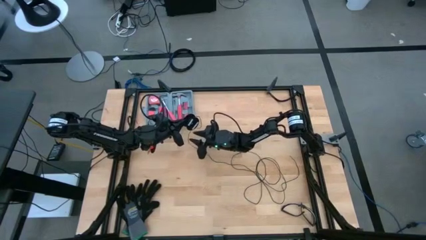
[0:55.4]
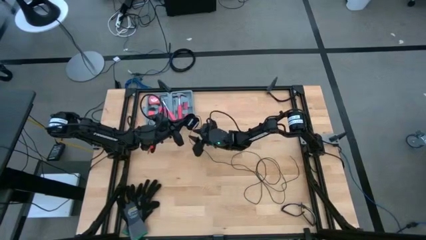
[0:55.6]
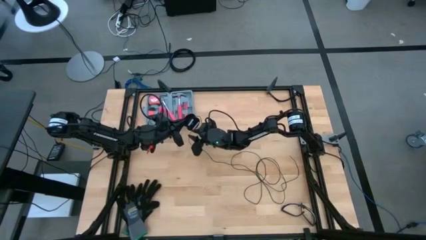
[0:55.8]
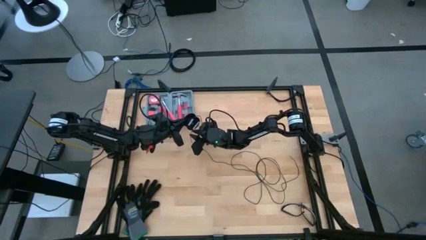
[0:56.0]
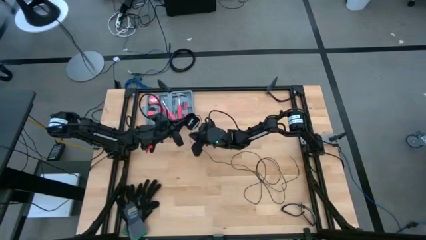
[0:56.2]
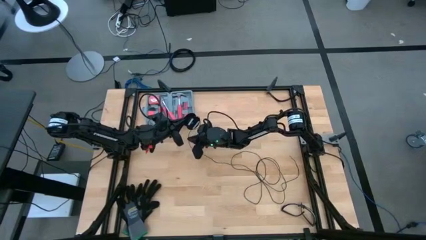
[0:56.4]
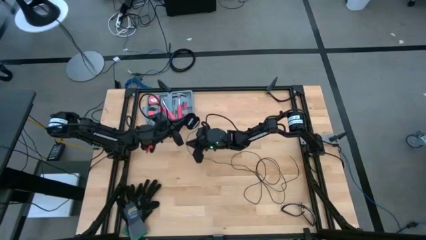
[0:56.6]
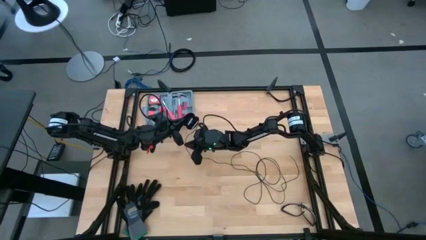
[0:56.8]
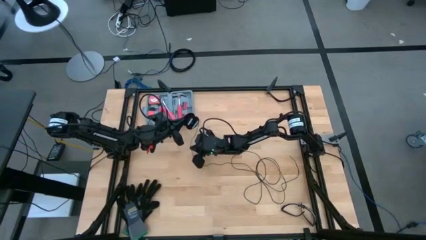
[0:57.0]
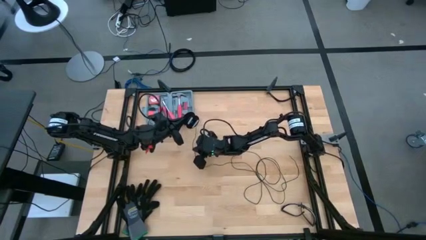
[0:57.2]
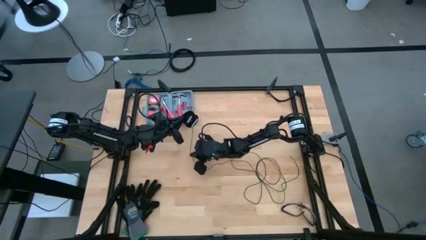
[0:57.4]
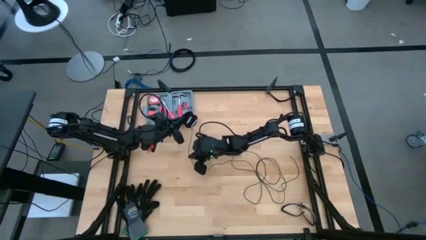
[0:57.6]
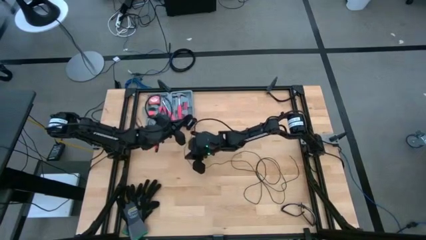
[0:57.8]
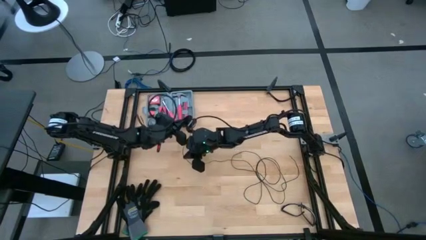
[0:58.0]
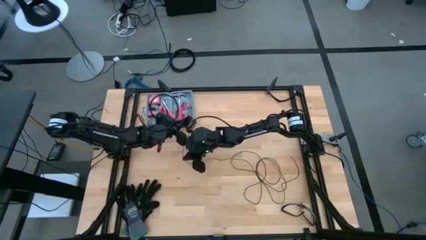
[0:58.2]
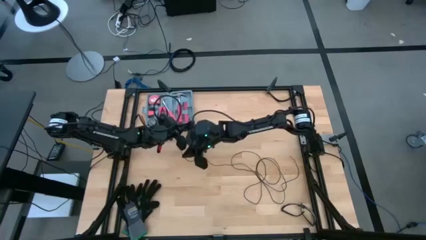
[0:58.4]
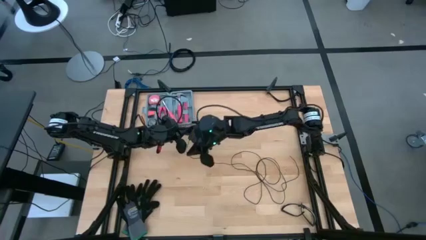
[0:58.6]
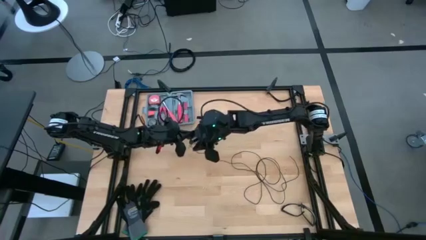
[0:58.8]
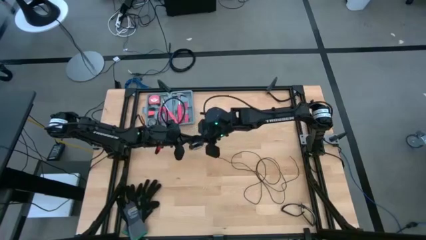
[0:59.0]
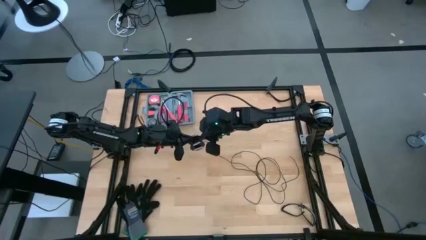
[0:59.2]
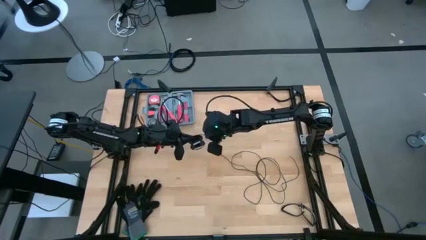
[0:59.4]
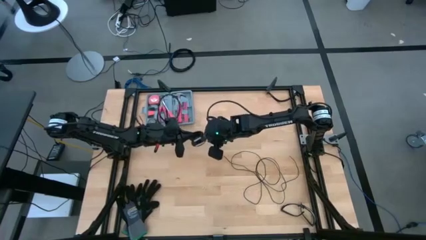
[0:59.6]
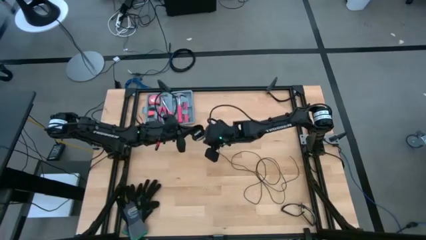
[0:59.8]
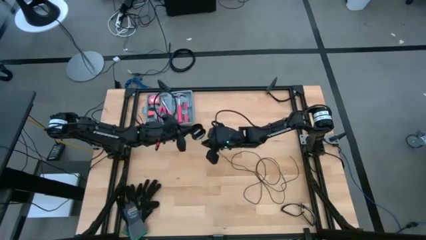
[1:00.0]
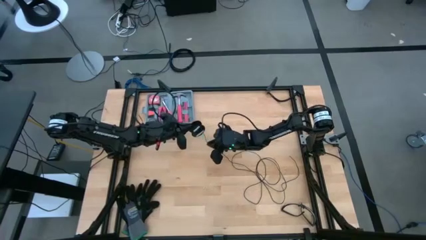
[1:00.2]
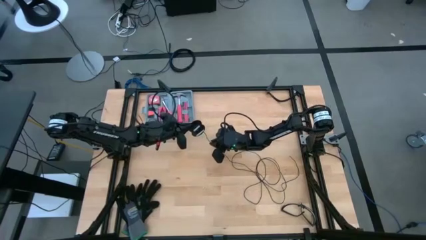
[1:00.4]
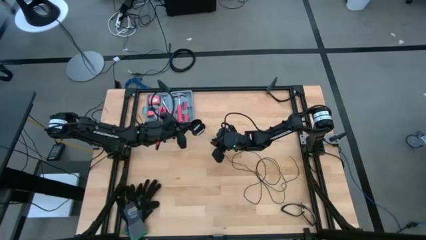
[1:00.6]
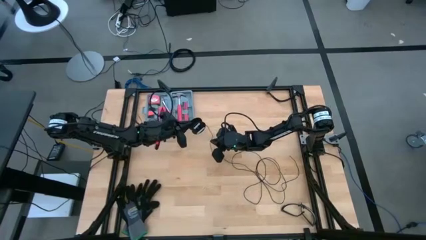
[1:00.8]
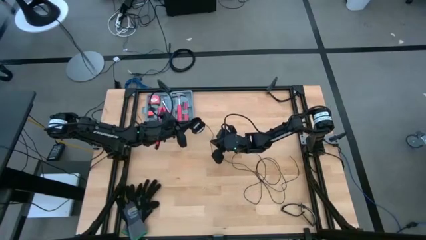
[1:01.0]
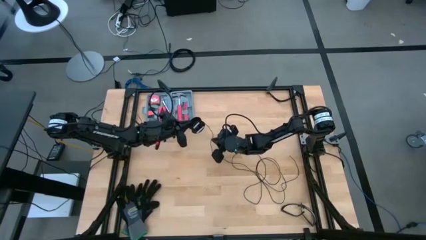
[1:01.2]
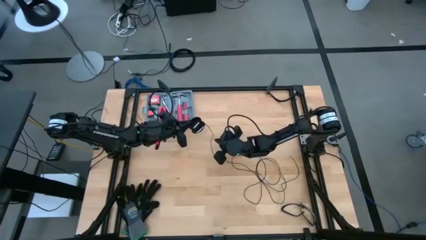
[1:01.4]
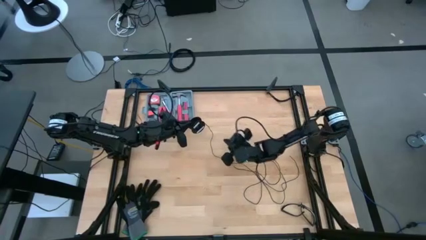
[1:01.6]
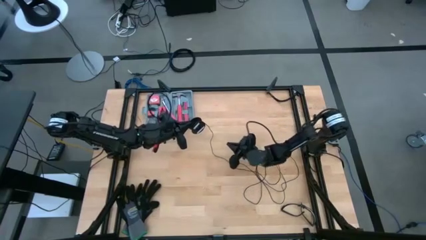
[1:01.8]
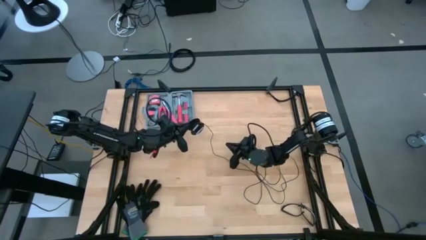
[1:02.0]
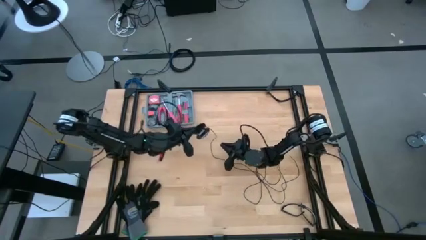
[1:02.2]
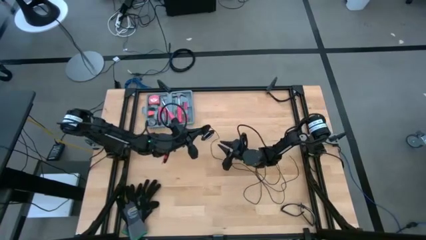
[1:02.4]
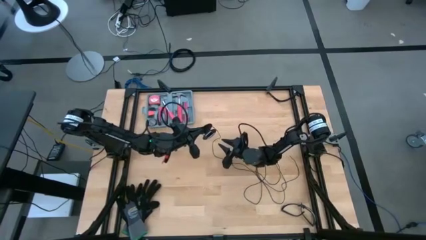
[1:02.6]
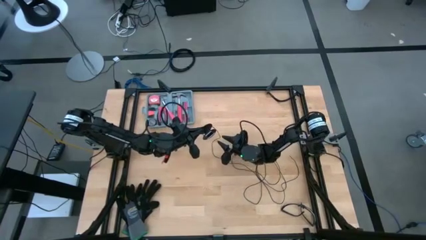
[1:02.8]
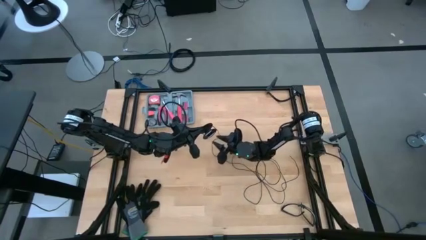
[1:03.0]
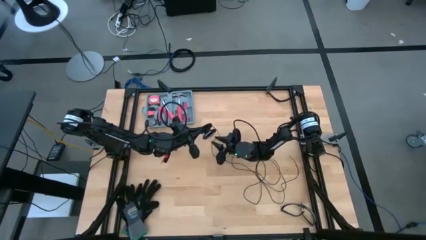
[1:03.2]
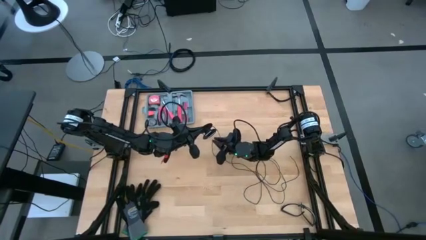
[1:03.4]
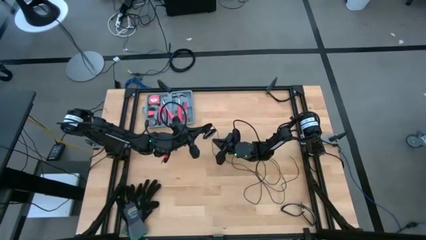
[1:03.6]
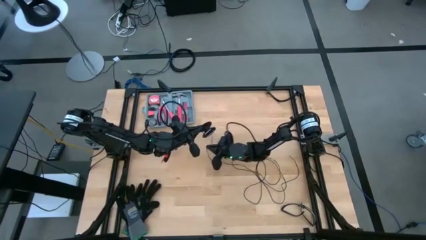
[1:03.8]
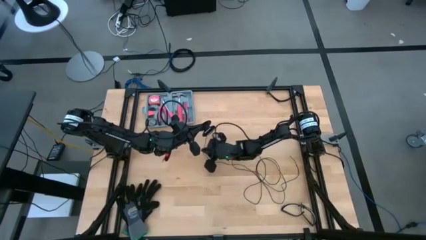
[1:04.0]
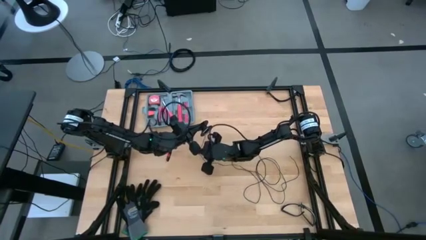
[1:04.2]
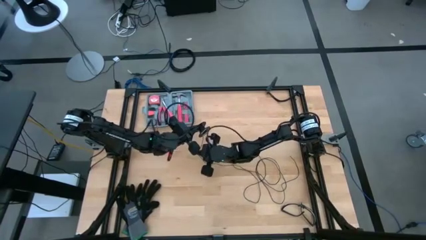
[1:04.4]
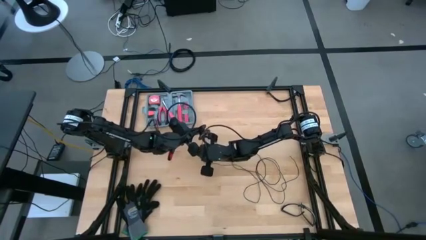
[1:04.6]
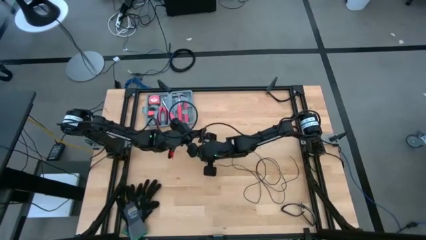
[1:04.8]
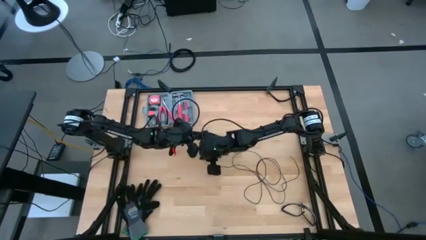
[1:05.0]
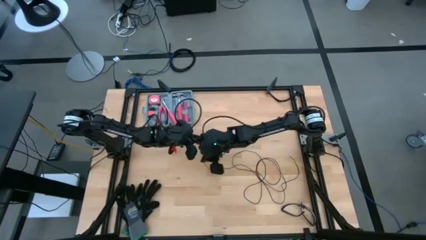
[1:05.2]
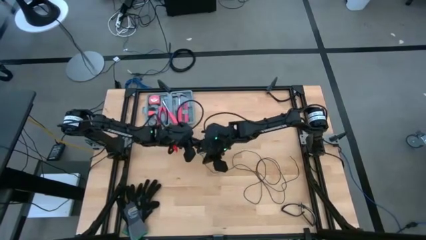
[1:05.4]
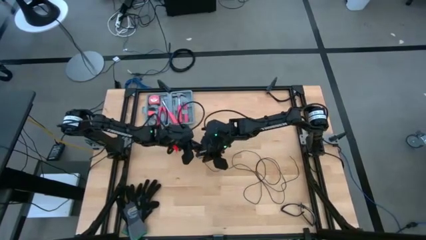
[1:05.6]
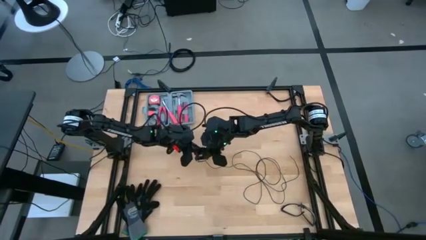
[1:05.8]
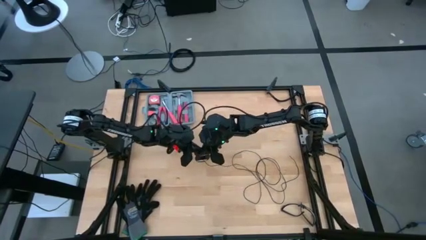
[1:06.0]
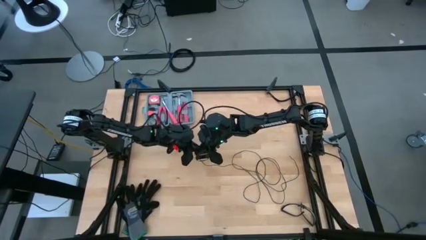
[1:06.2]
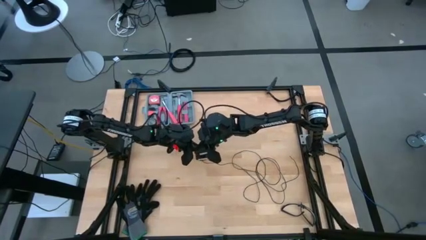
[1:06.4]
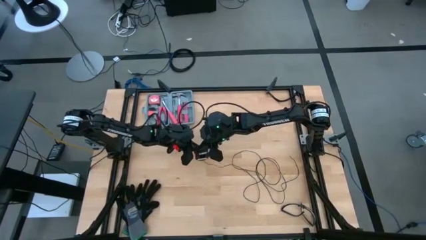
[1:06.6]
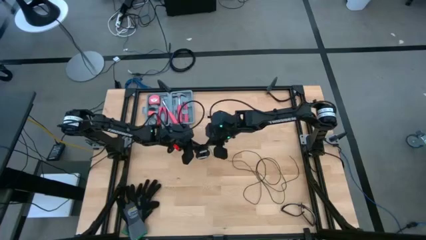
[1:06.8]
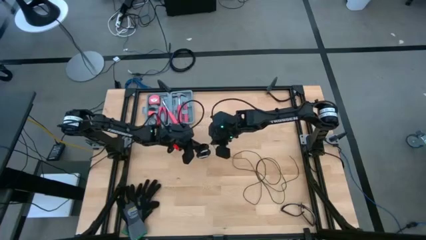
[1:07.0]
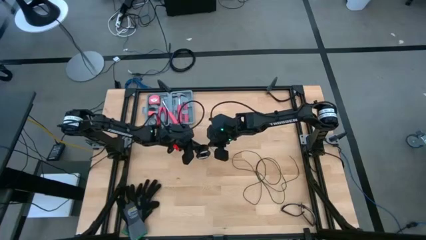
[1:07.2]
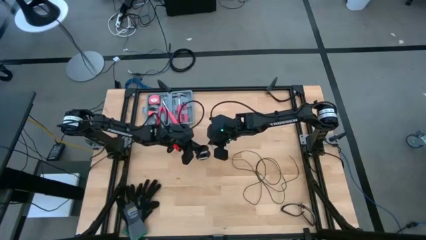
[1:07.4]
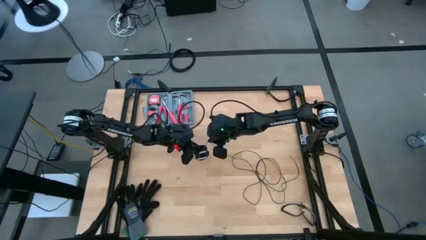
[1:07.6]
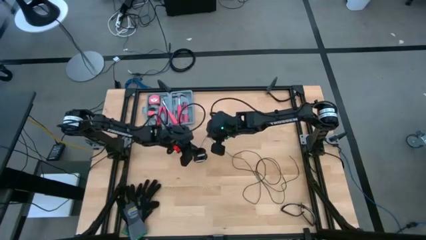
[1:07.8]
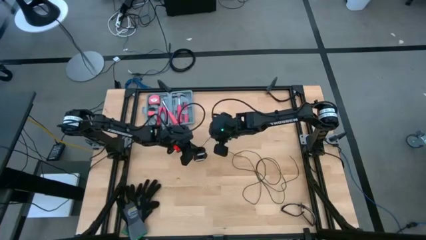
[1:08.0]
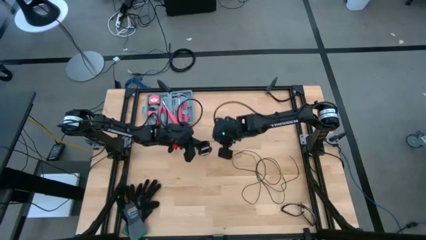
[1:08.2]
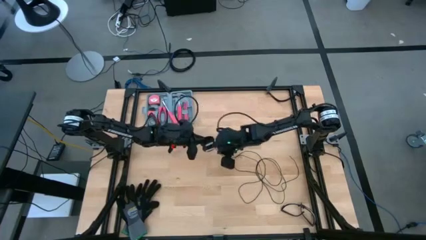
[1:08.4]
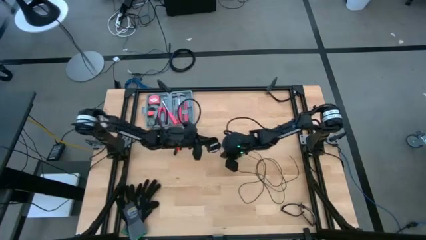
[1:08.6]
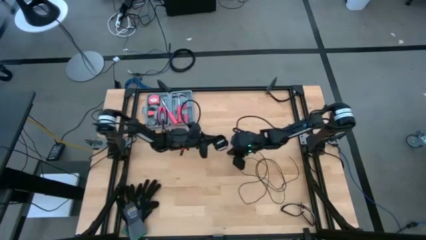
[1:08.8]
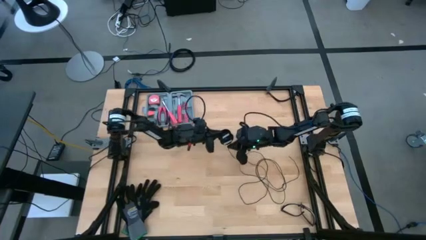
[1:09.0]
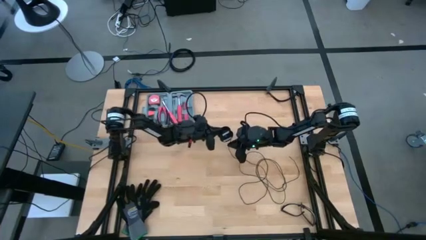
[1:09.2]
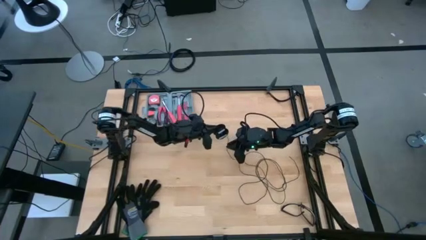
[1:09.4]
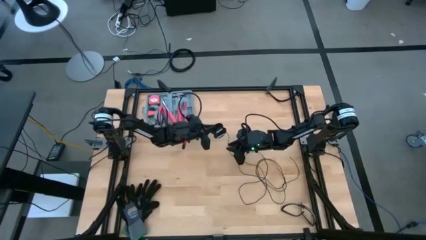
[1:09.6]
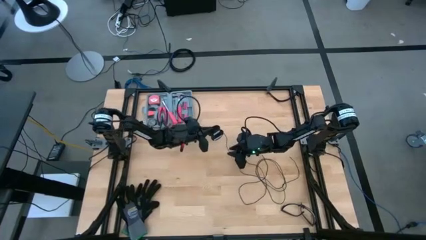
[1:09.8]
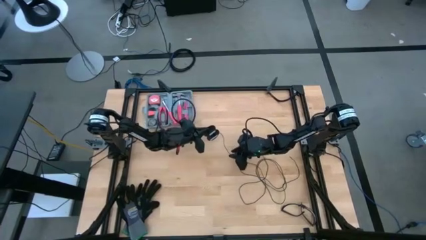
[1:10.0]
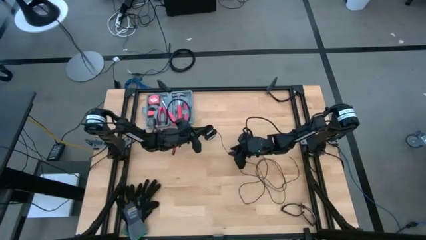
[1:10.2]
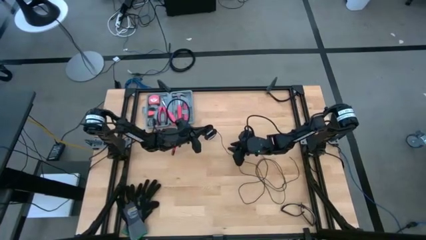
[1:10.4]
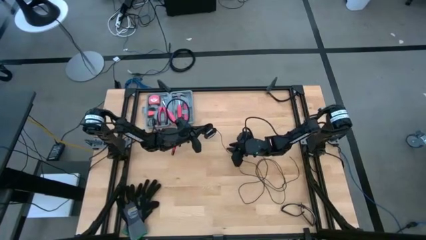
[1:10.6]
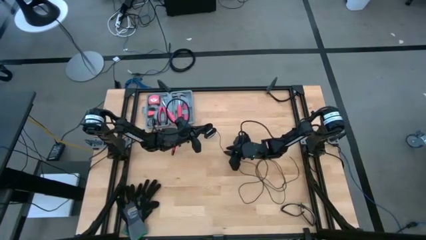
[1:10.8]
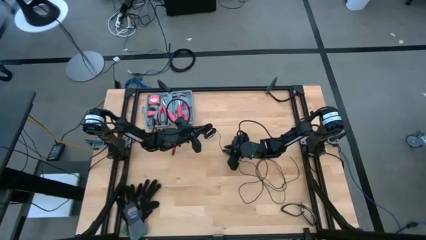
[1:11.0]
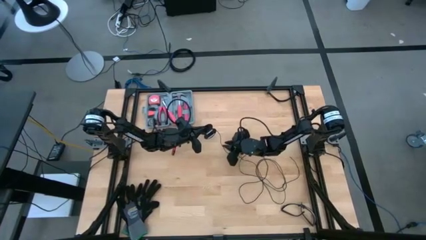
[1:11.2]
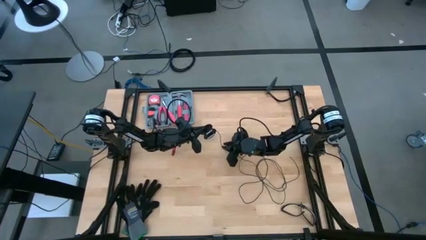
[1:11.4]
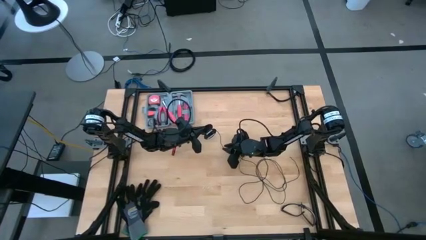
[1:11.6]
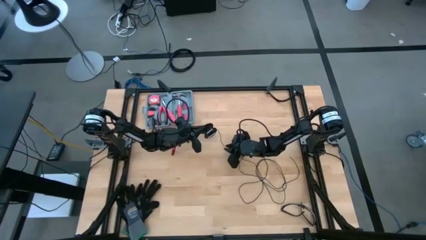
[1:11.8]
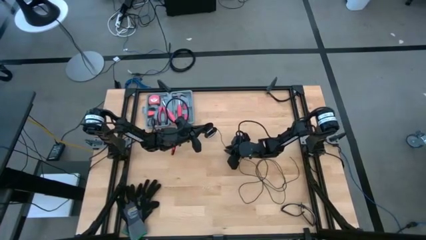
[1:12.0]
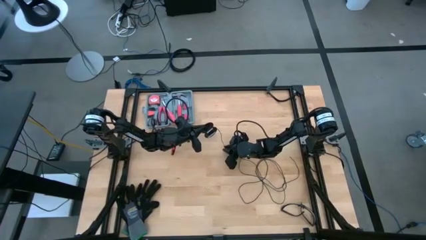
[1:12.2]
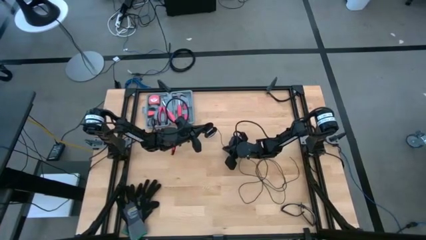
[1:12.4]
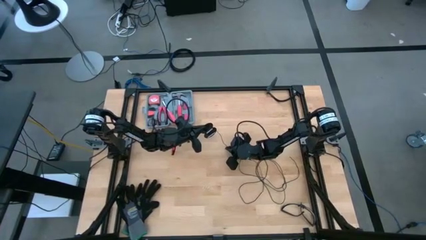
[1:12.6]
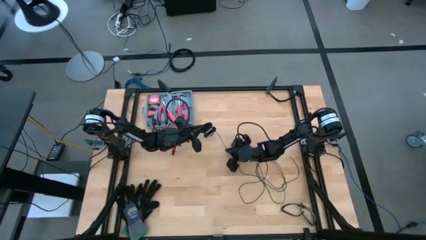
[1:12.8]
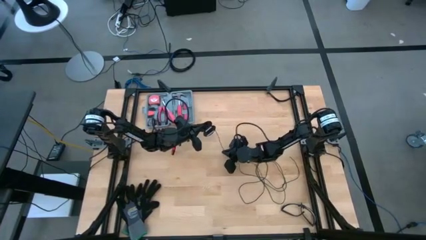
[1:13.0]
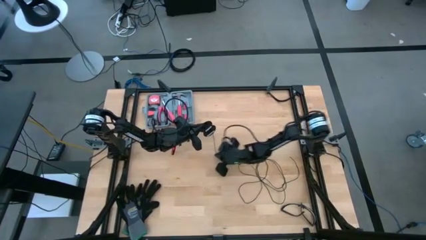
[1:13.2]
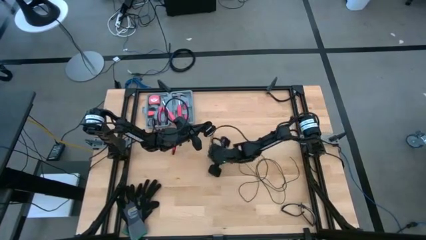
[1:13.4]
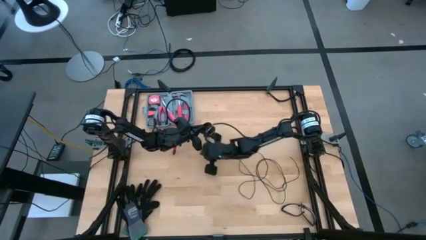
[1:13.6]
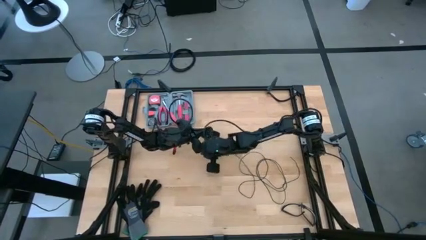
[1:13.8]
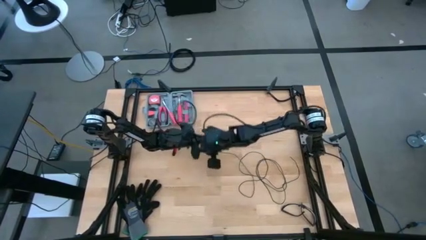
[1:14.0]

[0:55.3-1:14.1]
Task: Coil cords
Coil the black wire onto the spool
